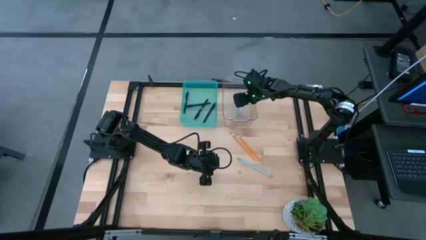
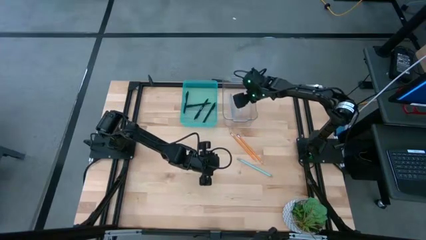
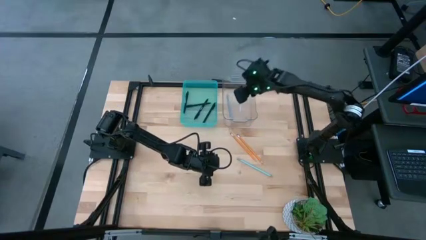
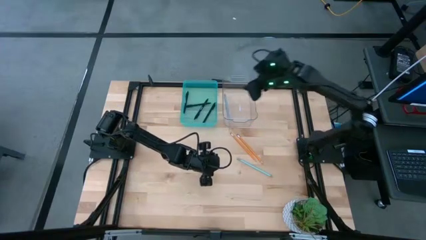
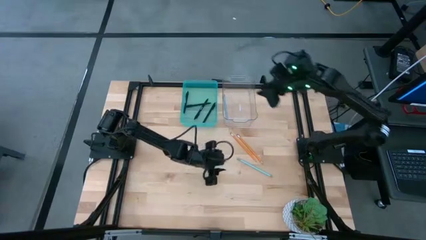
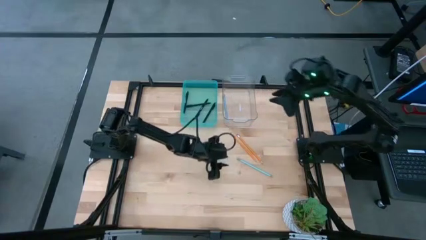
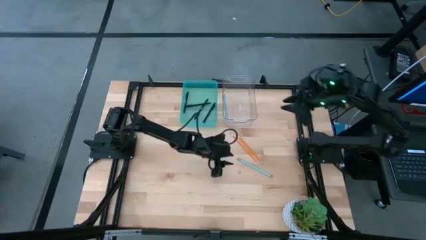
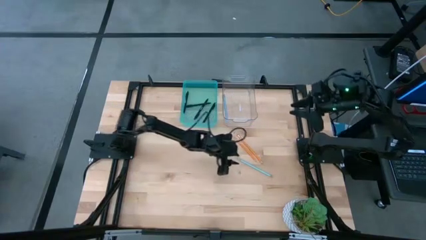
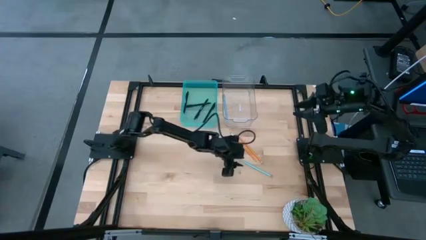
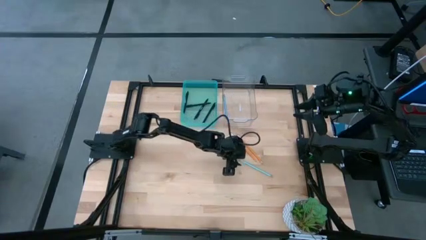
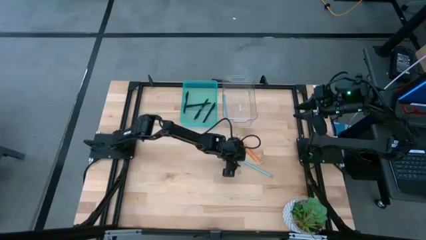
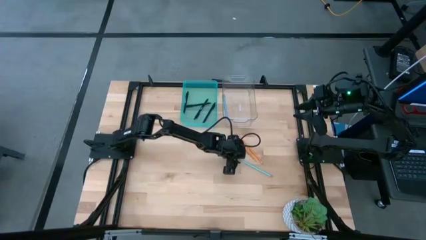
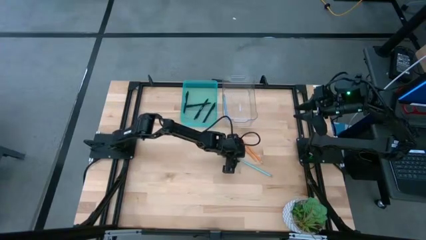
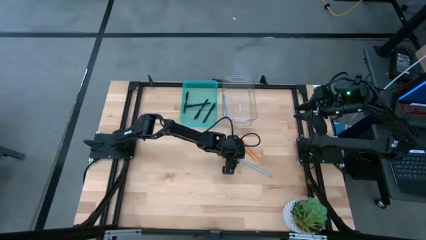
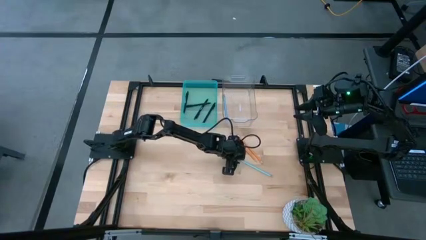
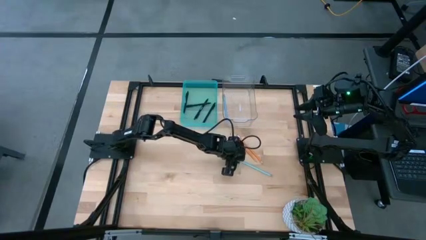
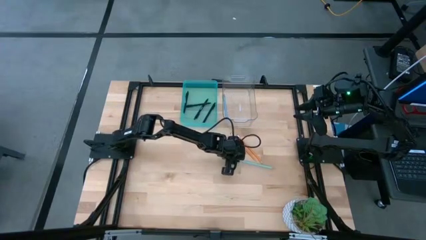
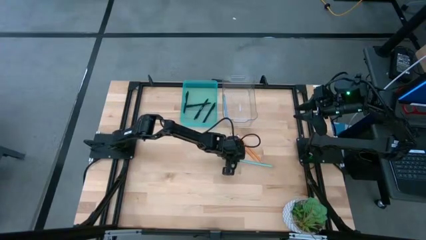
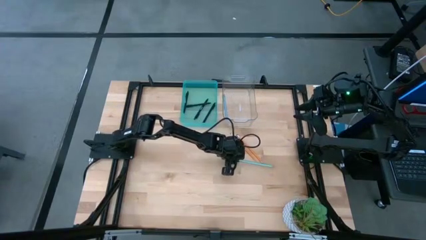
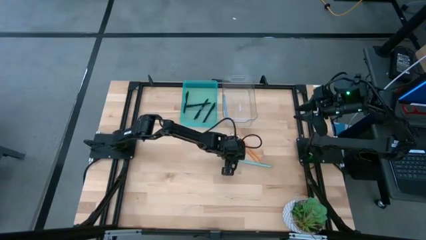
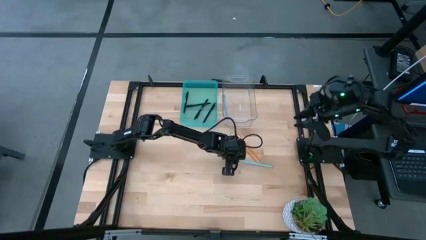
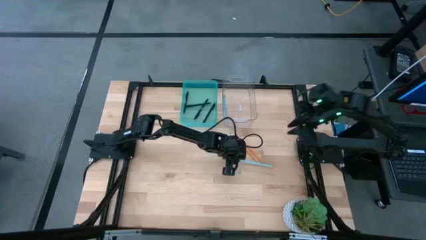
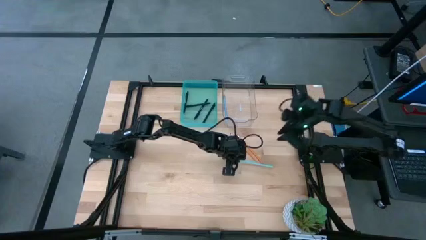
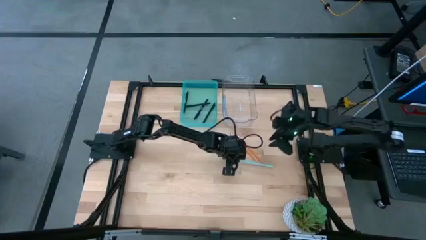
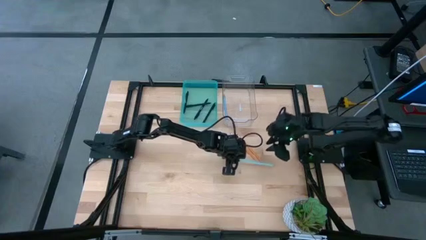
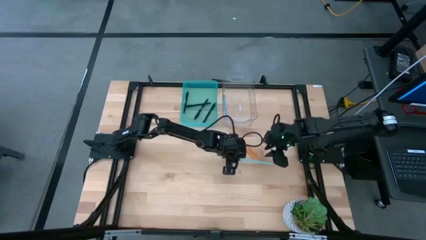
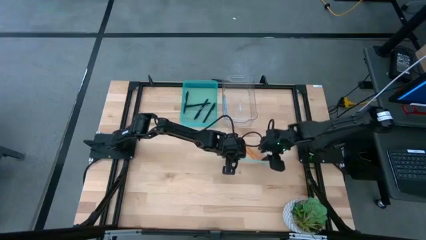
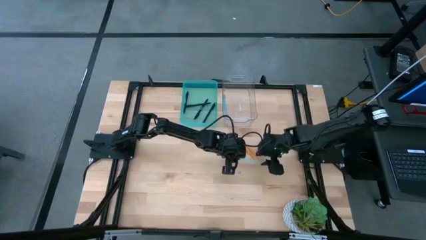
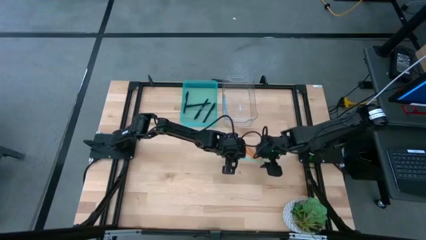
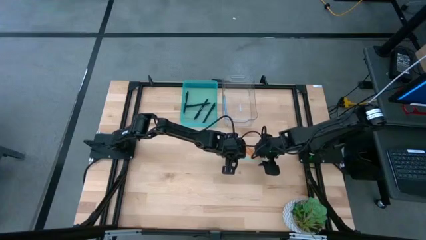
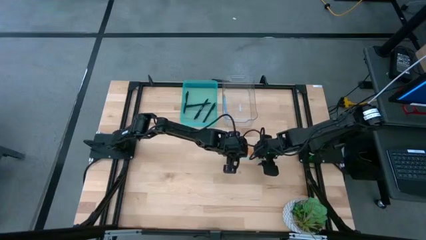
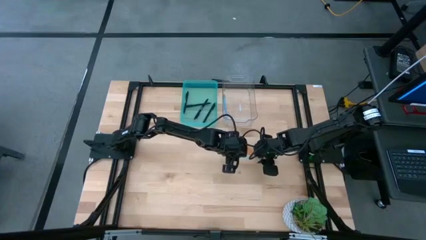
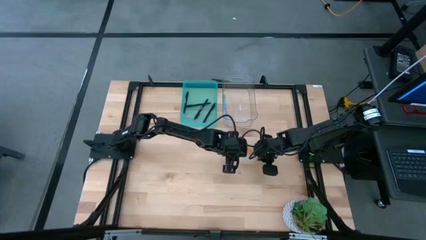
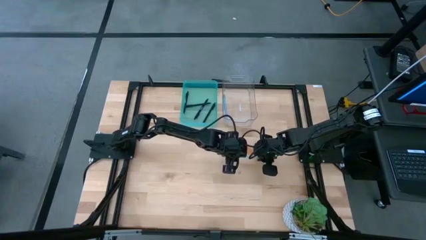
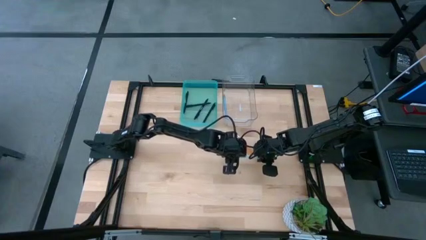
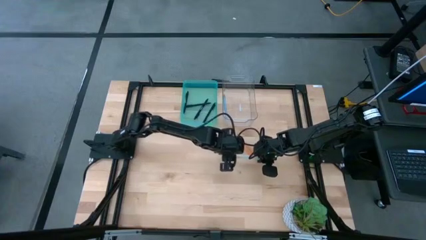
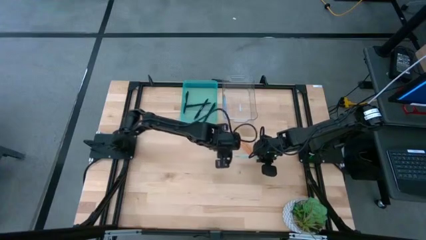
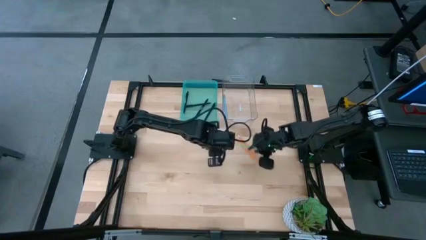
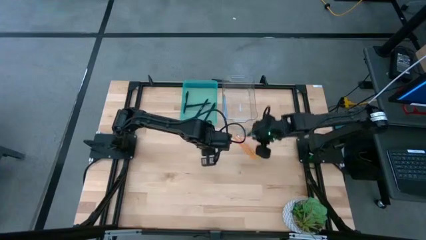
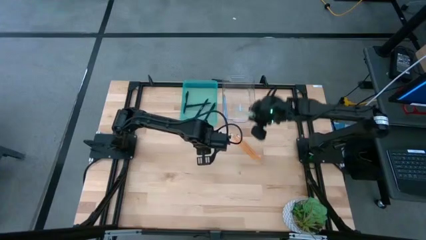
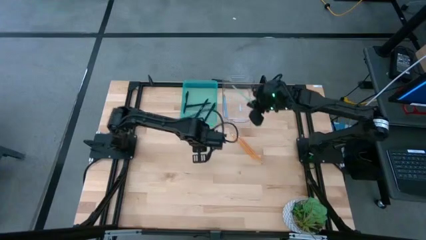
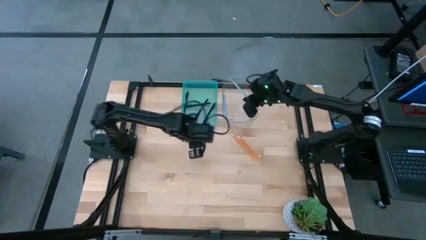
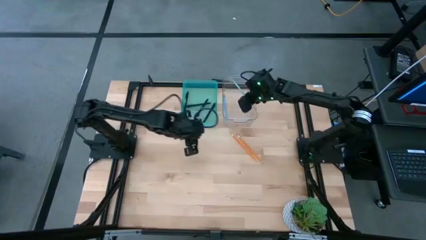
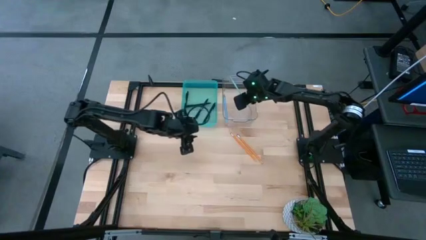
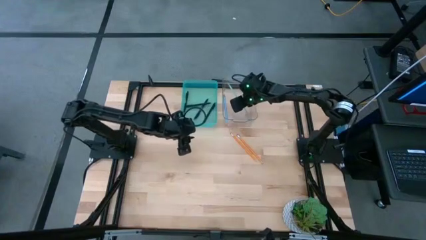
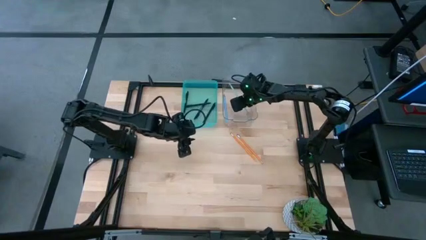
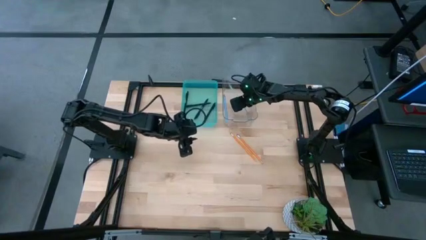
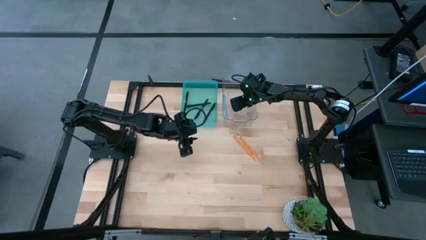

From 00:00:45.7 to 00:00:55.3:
Task: Sort pens & pencils
Put the light blue pencil into the transparent bin

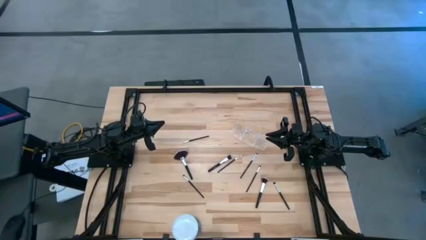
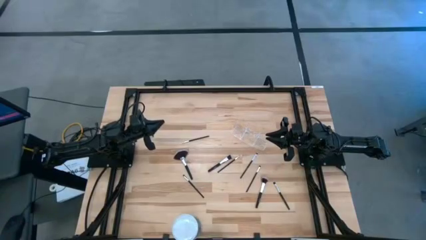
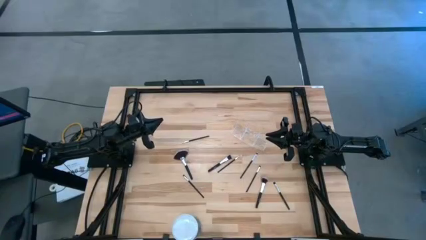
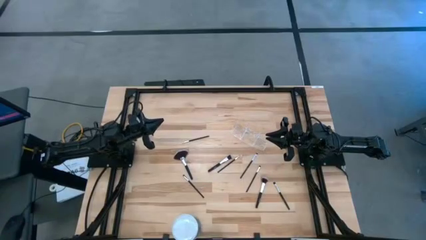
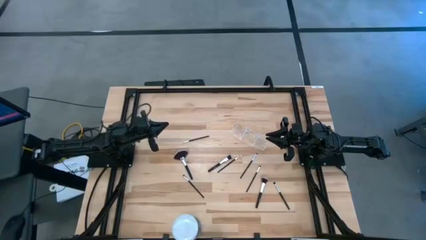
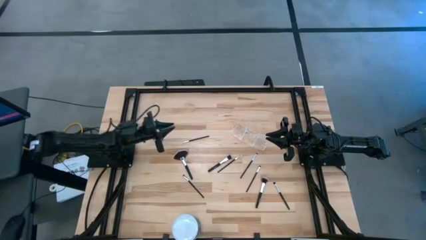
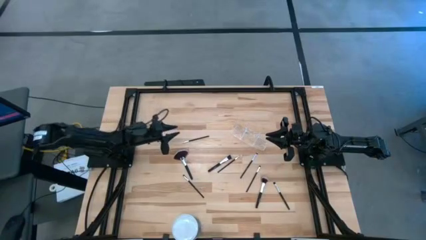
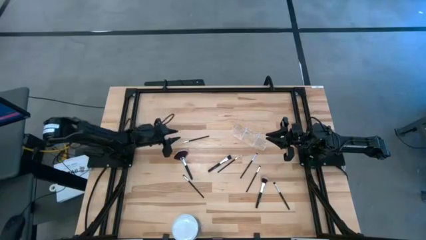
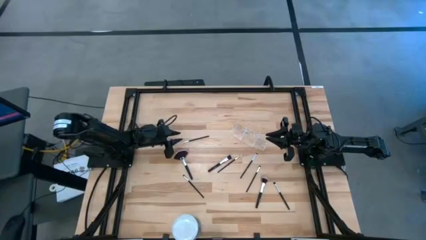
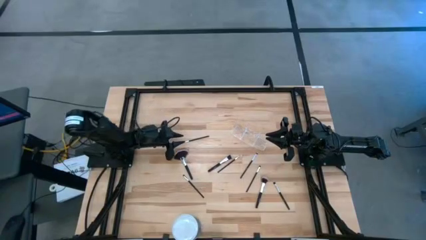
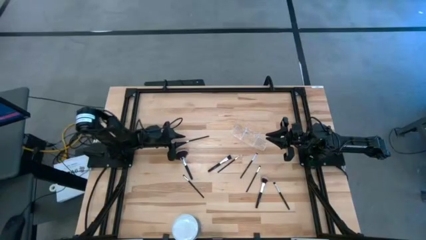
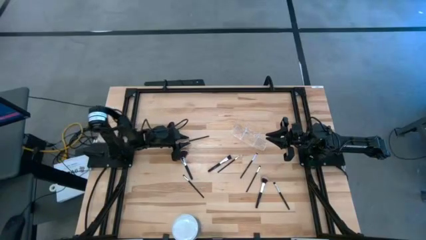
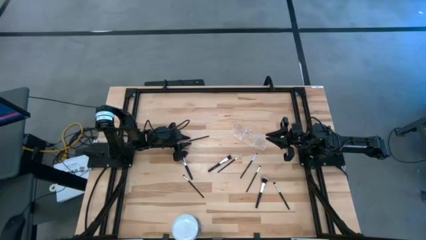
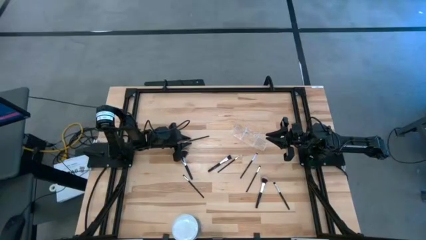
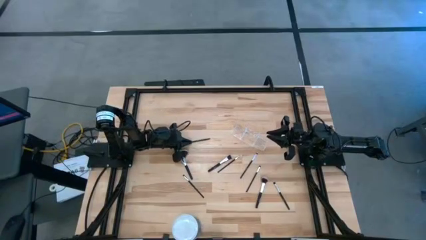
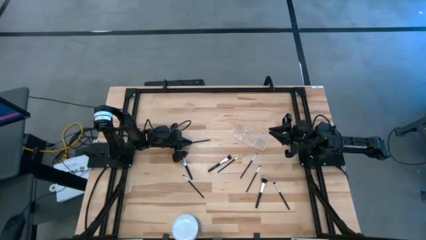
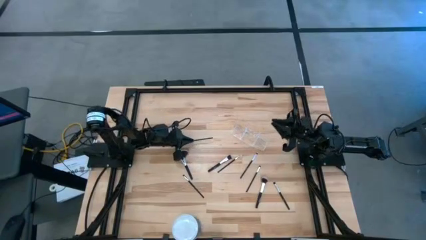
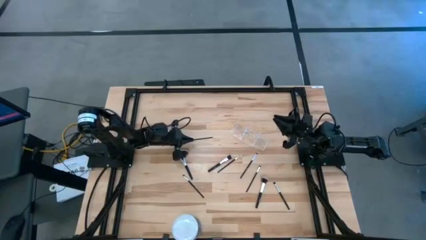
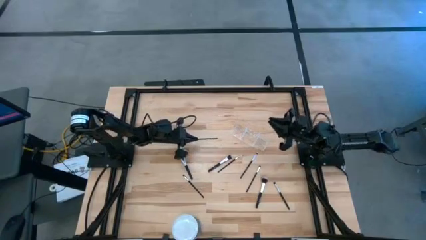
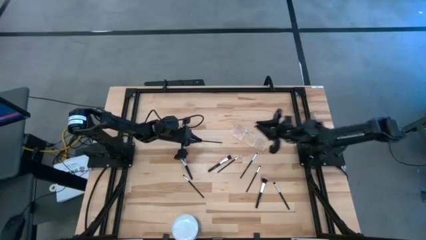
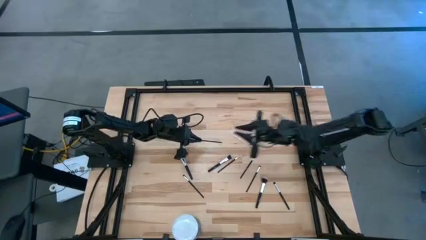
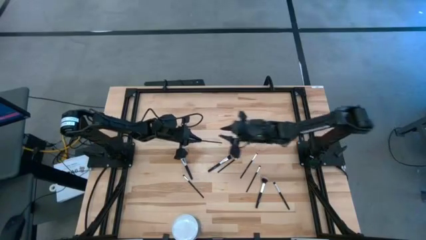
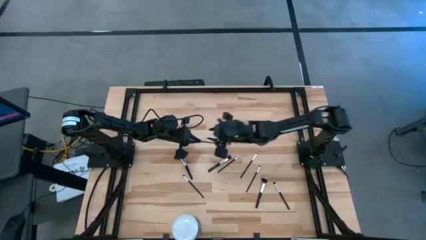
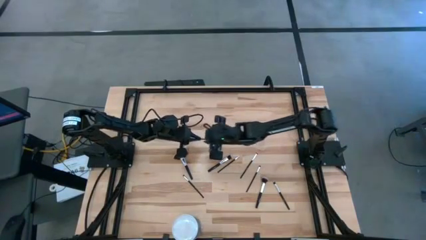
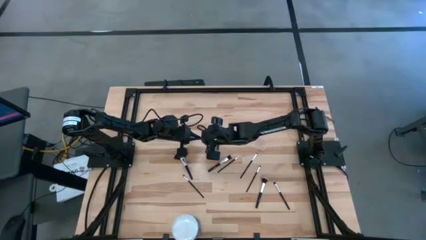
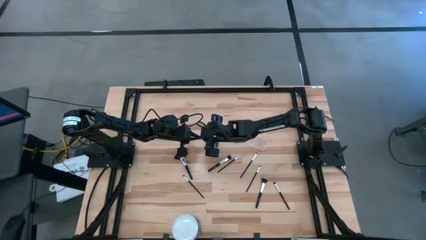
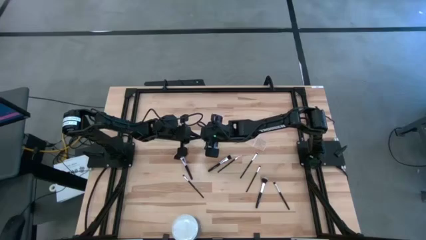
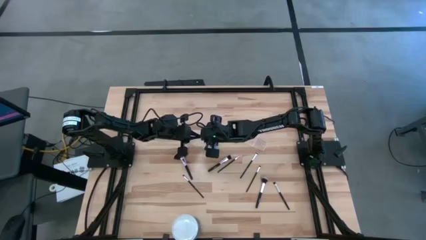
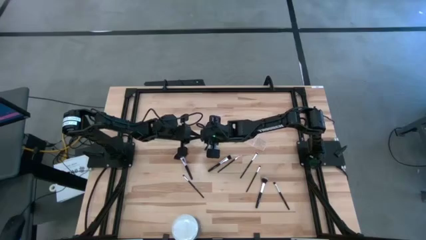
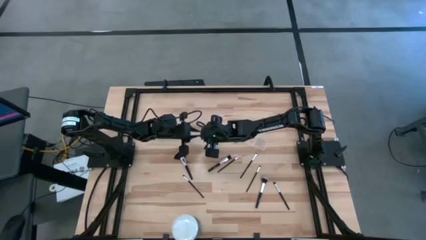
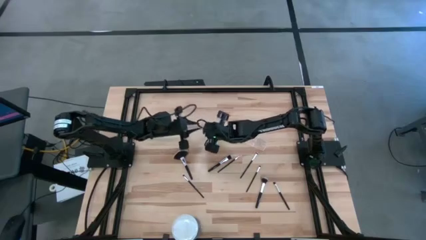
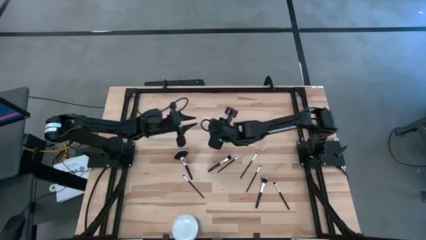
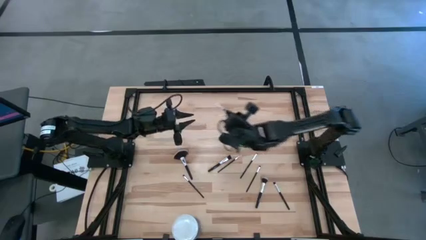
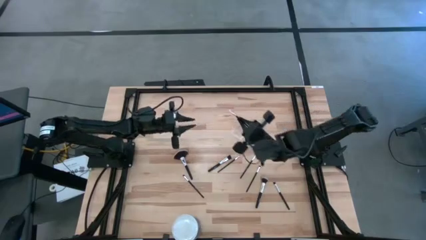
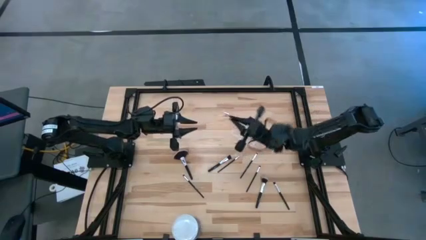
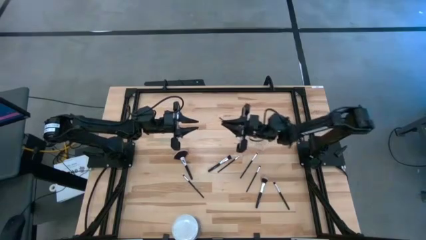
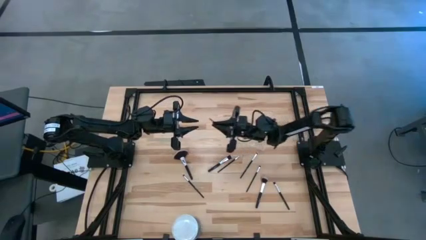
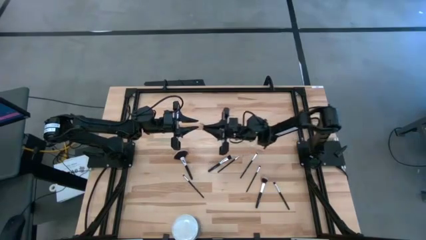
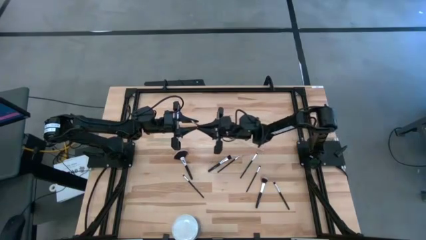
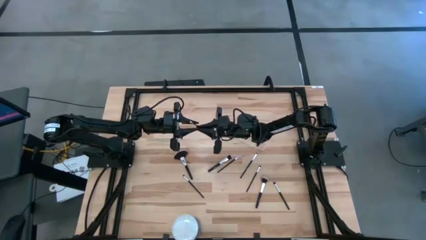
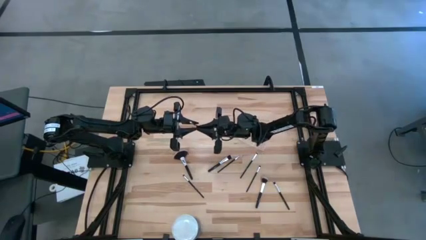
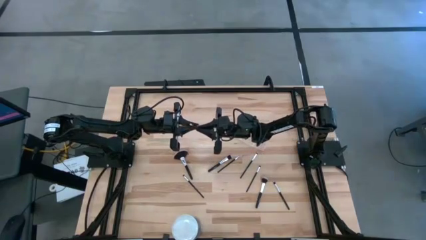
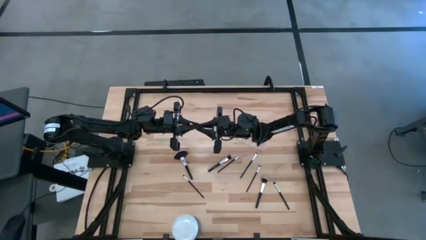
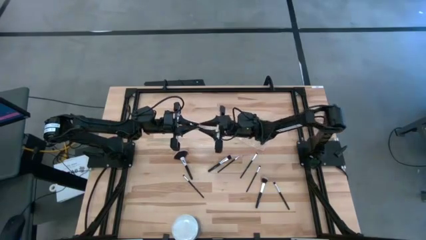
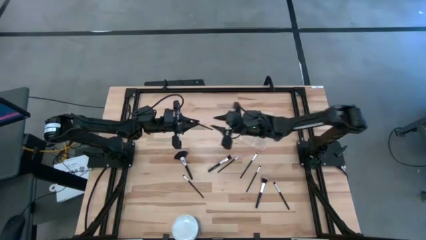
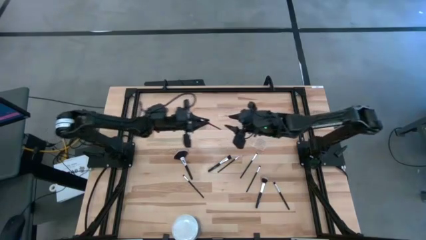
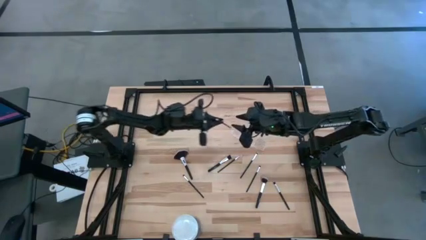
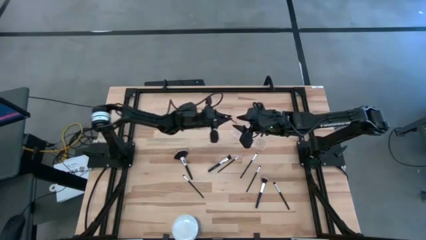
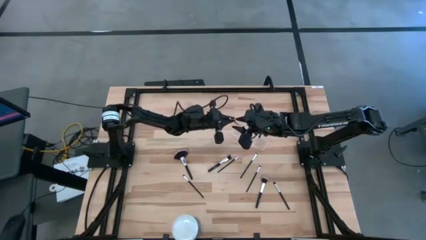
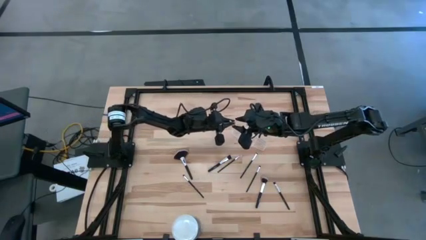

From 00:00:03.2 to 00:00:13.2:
Task: Pick & Place Makeup Brushes
Put the black eyeshadow brush into the makeup organizer
